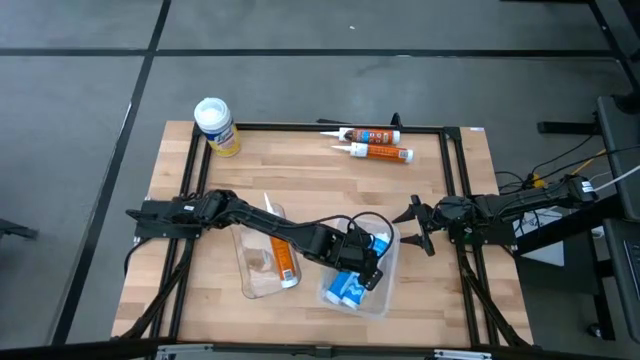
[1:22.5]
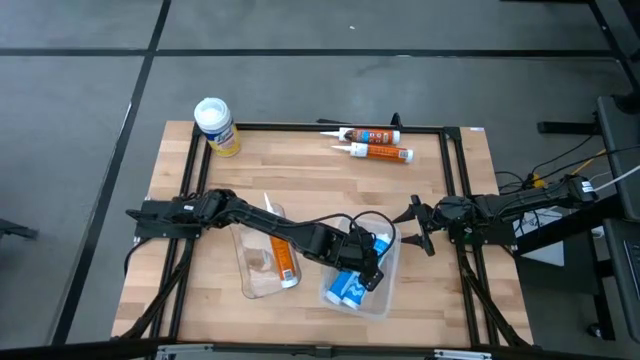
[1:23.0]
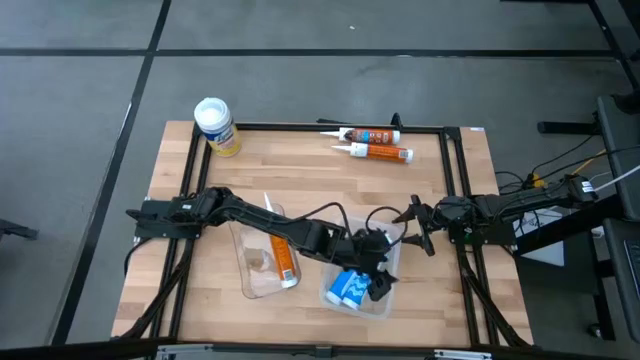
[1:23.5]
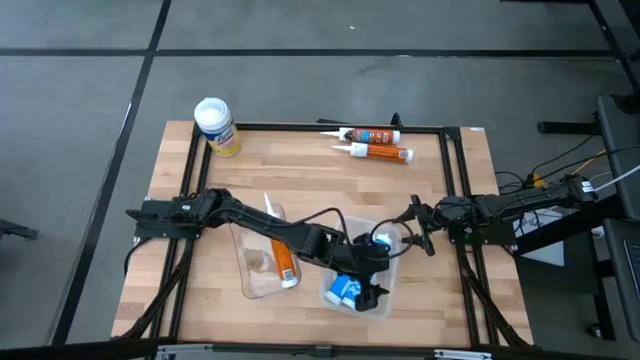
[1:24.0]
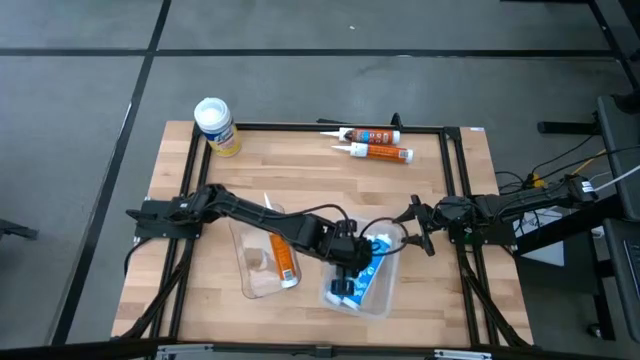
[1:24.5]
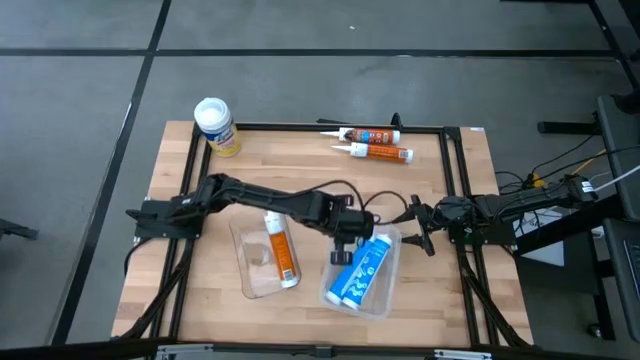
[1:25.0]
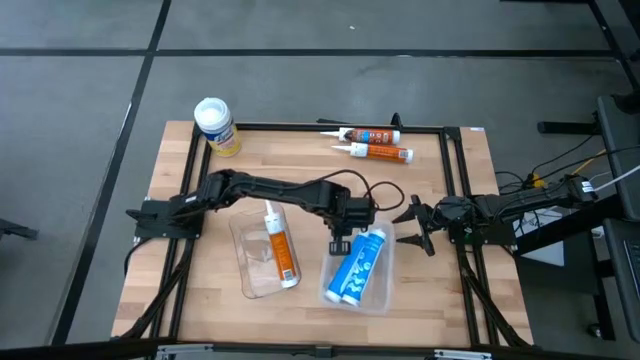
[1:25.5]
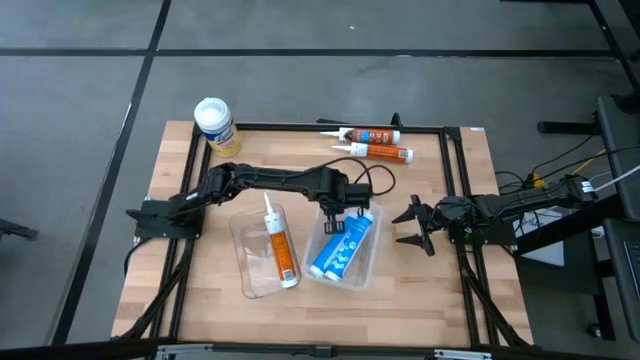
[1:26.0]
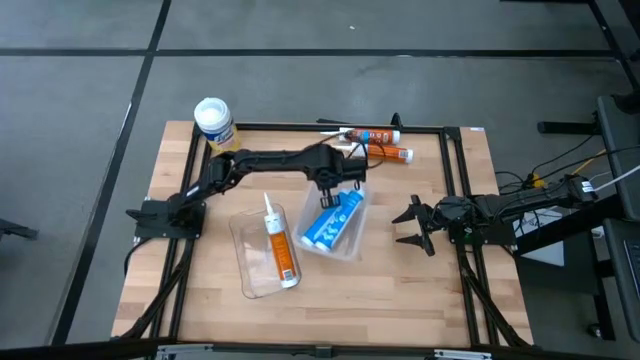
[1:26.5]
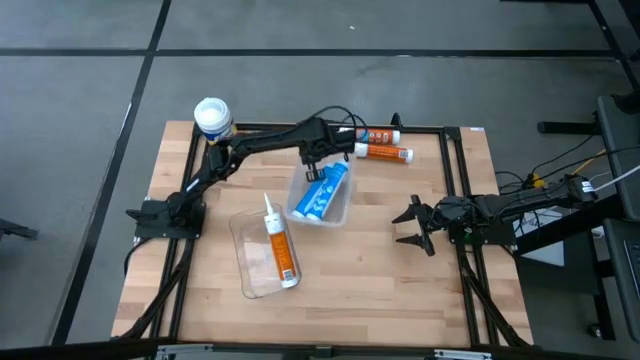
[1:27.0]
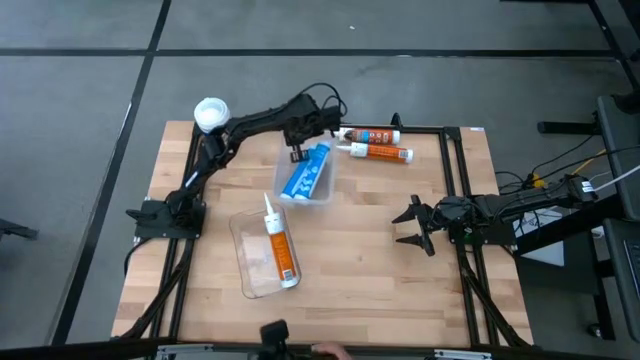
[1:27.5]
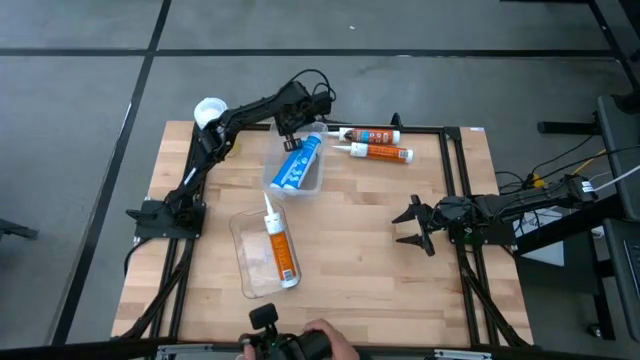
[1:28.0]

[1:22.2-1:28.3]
Task: Pick & place silicon tubes, Sealant and Lysol wipes
Move the right transparent bin to the top of the table

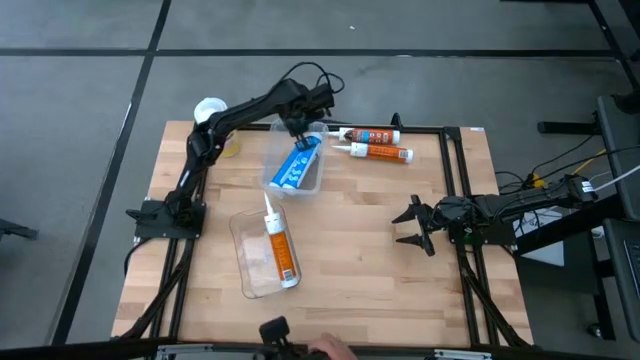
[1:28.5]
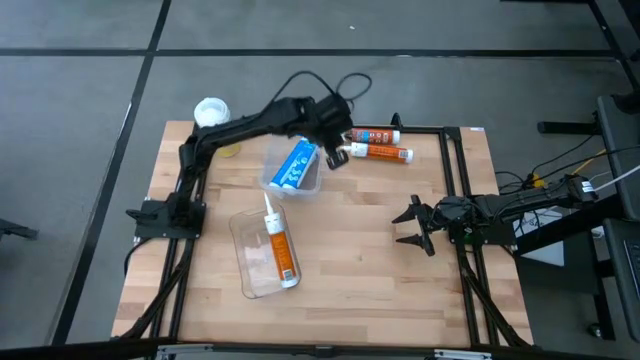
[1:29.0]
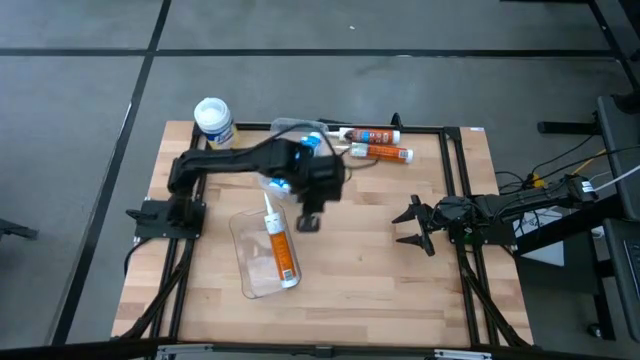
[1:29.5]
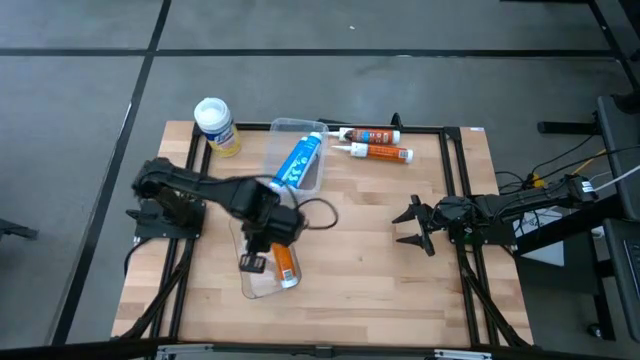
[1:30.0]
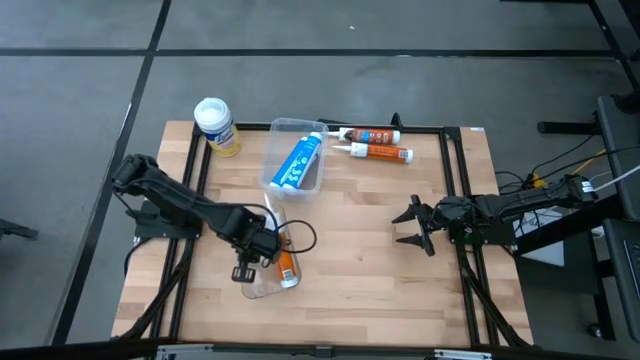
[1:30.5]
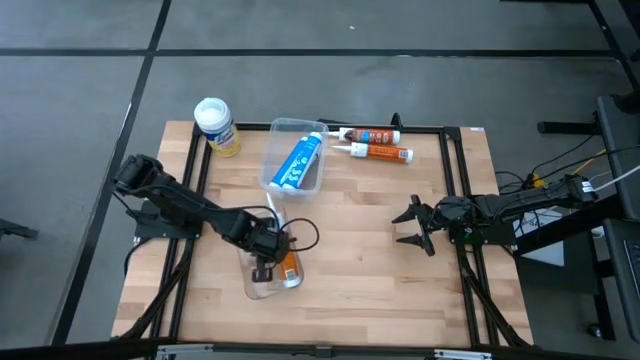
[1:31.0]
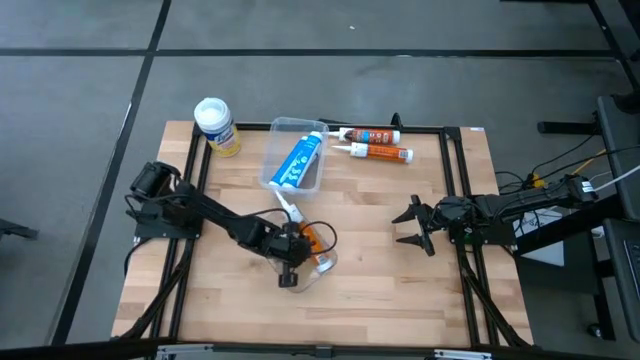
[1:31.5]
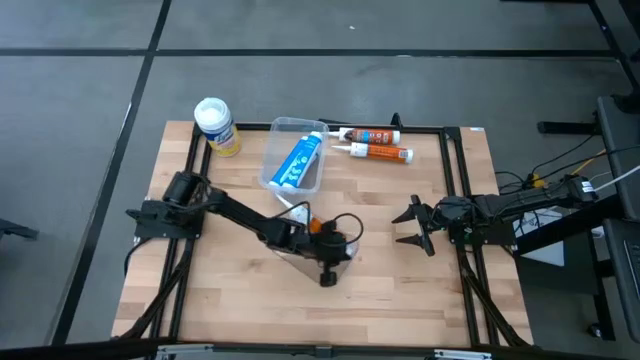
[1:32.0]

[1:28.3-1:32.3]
Adjust the bottom transparent bin

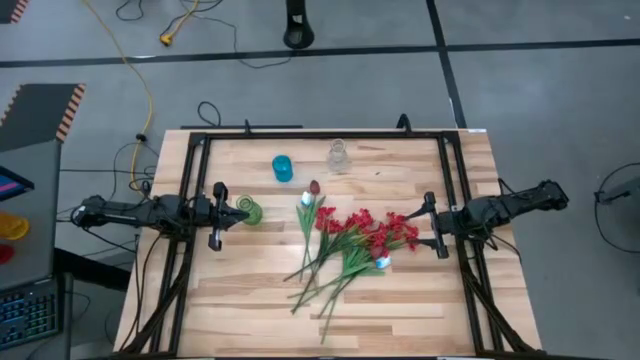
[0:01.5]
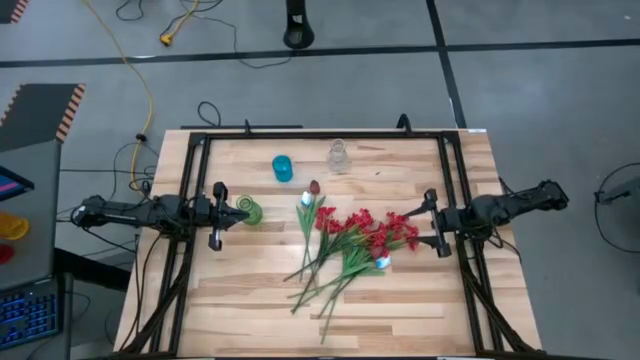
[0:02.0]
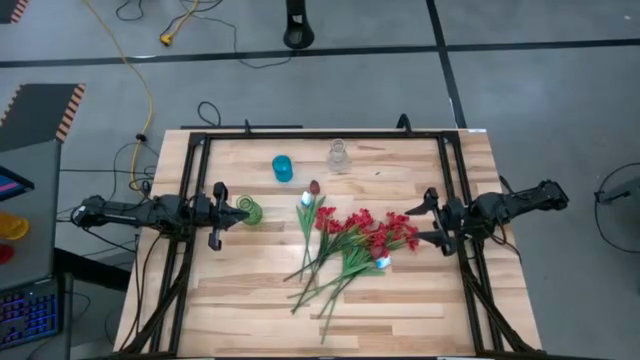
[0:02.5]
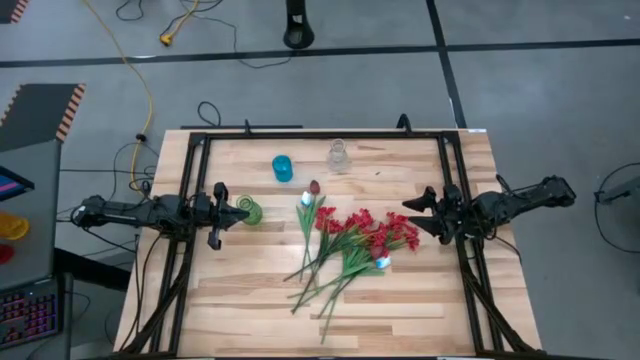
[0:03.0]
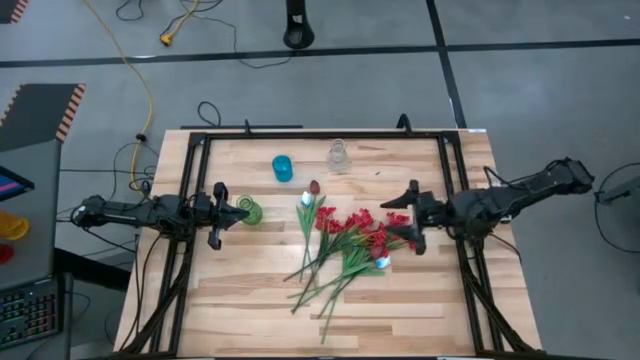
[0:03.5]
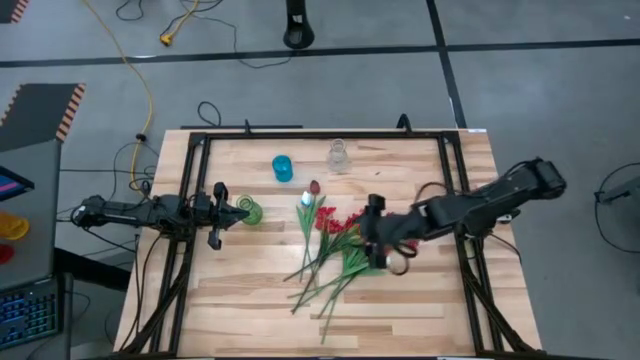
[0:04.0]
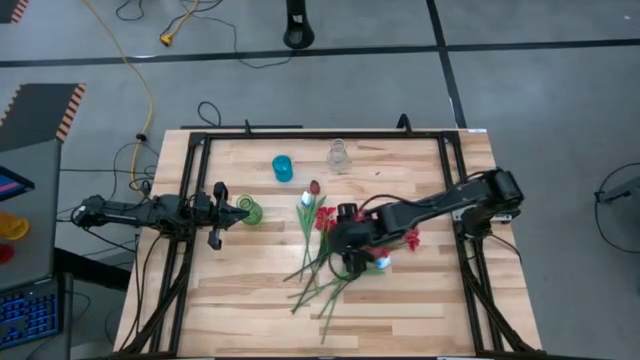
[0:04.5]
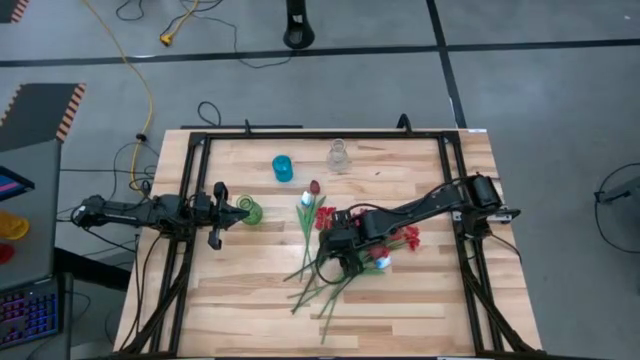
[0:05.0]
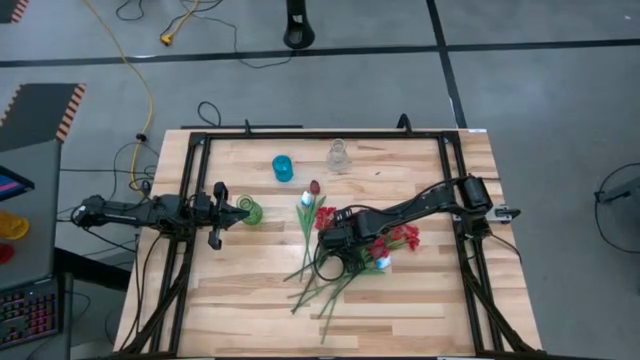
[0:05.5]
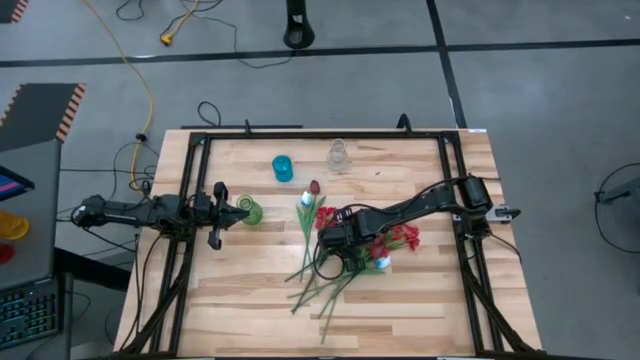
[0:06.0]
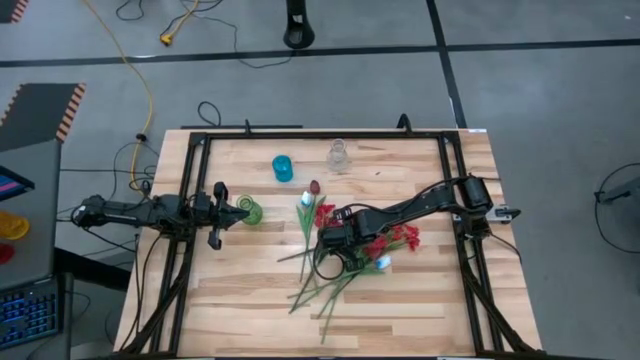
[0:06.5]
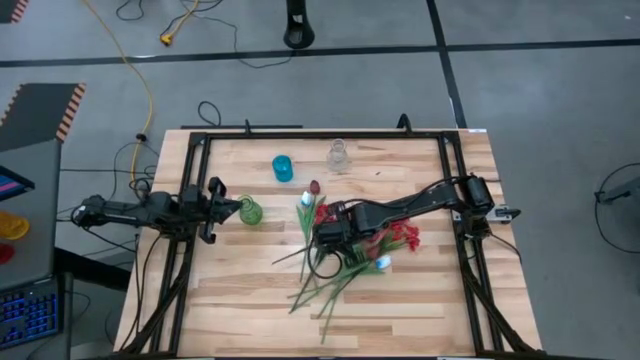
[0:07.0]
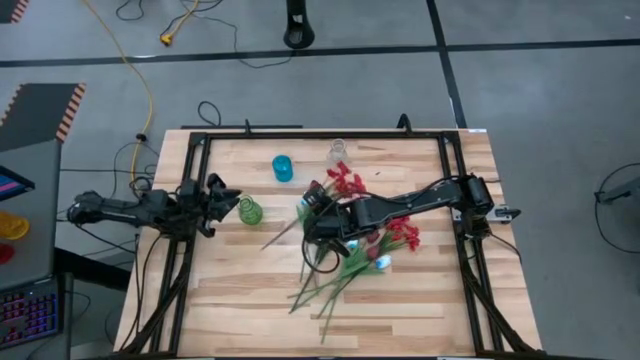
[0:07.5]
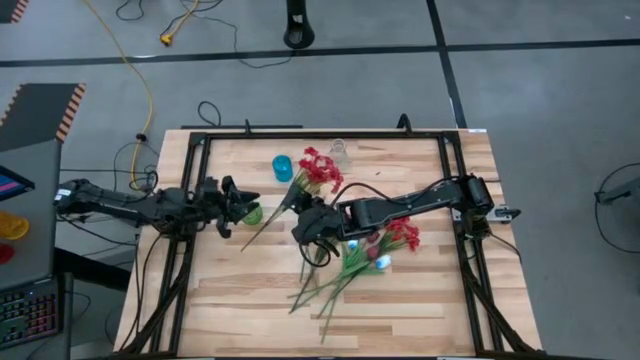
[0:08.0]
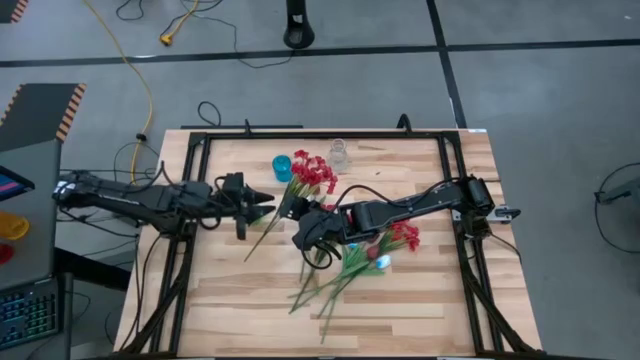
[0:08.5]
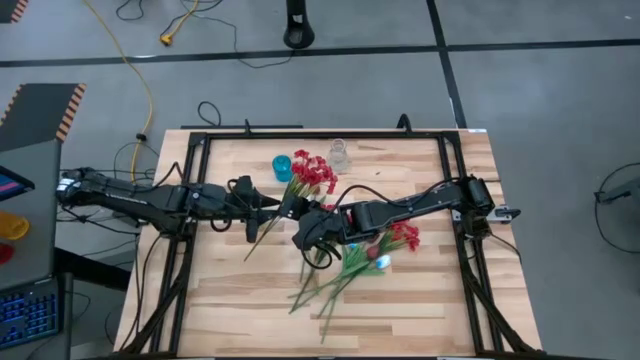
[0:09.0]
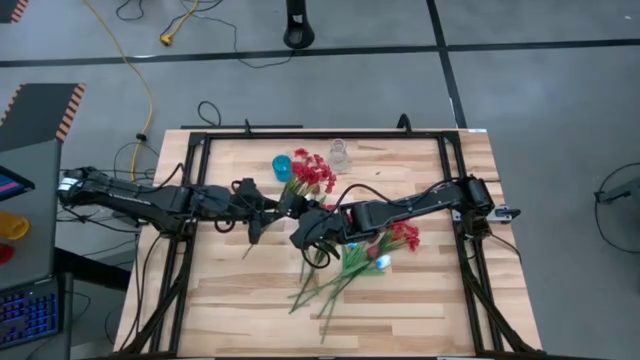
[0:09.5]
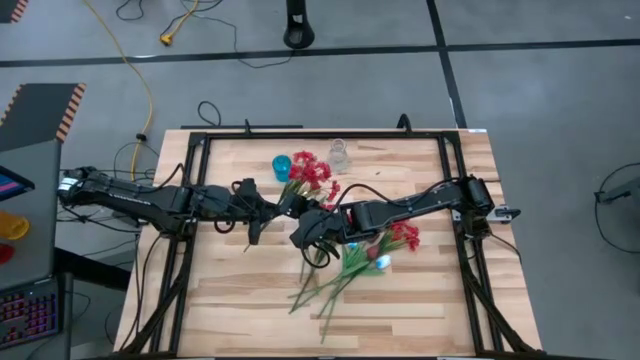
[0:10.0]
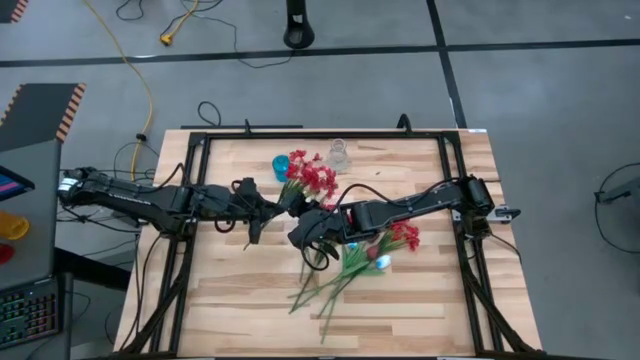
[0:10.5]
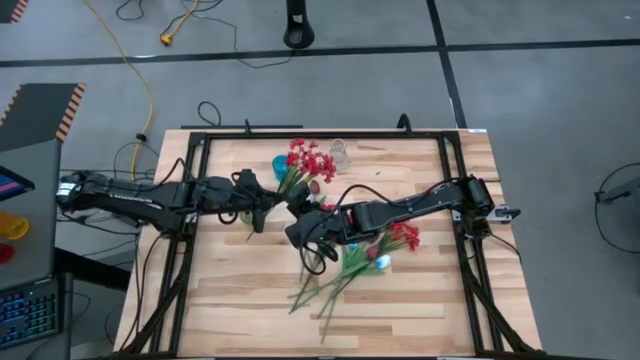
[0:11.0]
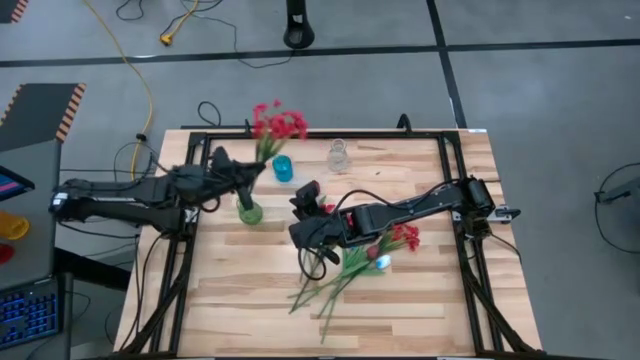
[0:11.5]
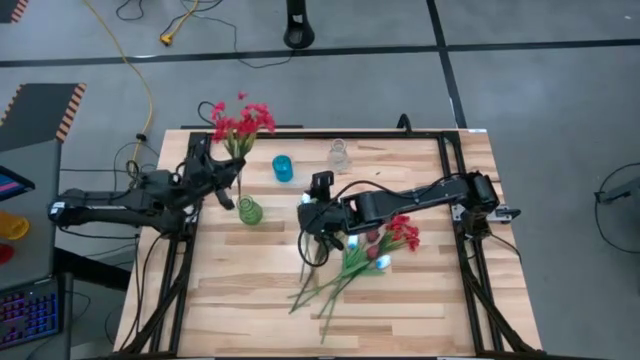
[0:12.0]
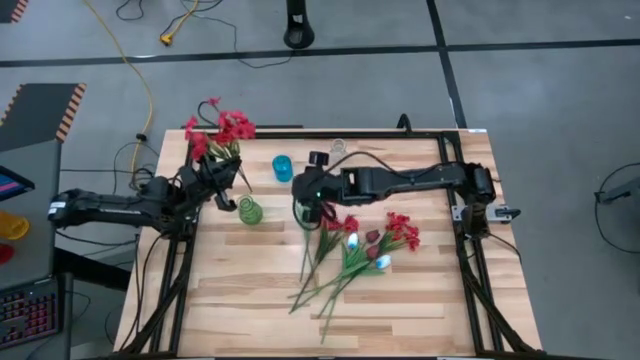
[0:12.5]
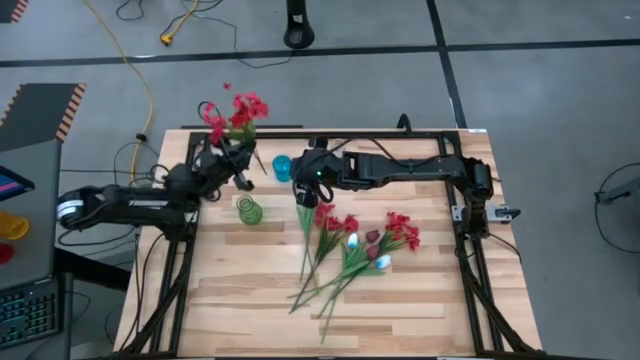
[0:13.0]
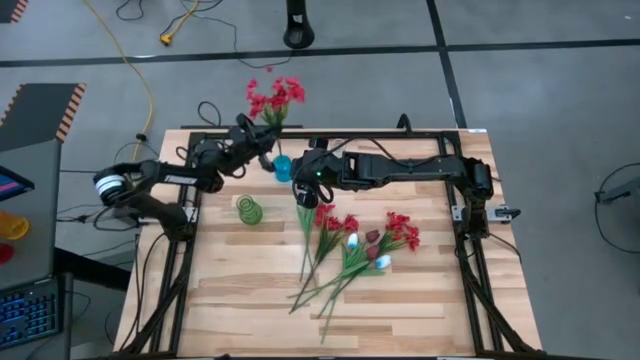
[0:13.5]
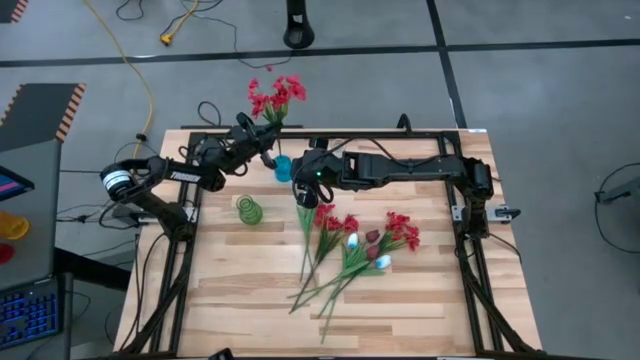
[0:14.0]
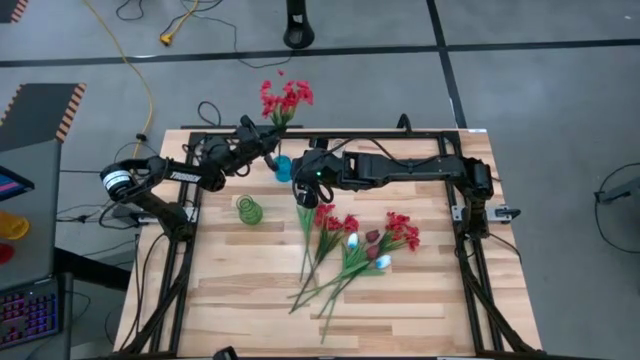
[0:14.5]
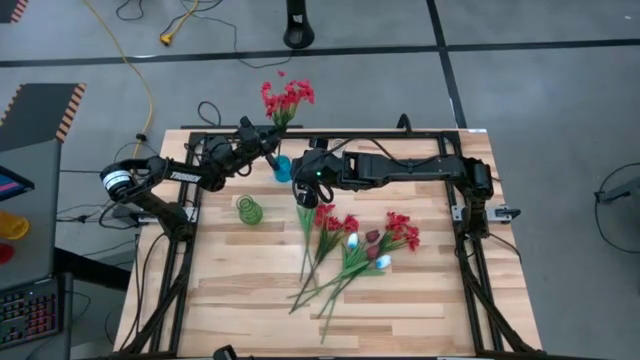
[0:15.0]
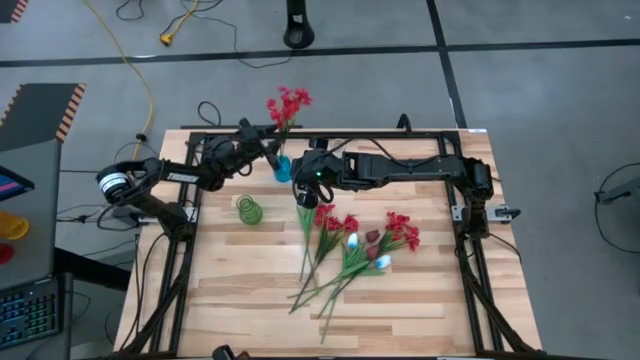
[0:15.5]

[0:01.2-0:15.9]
Task: Sort flowers into vase by color
Put the middle red flowers into the blue vase
